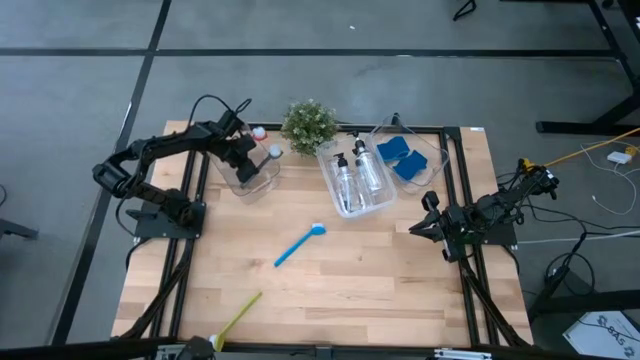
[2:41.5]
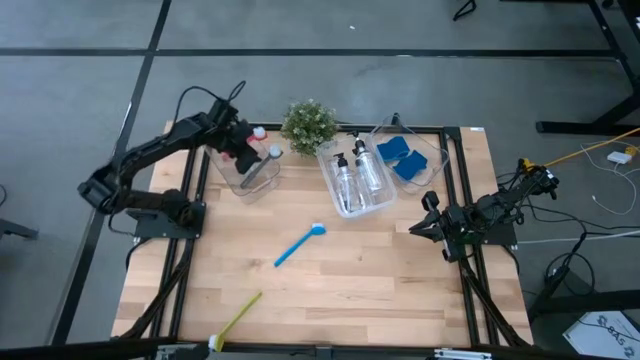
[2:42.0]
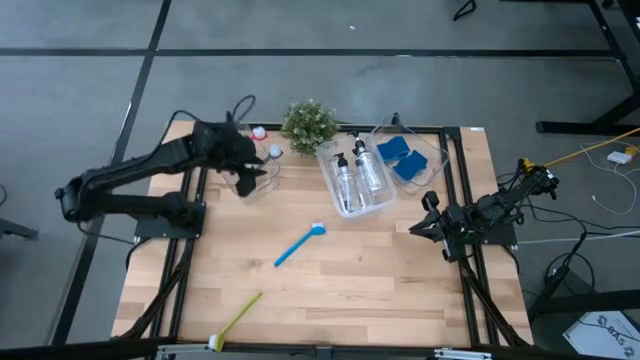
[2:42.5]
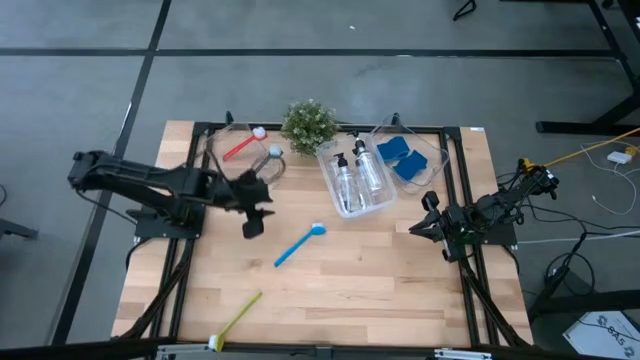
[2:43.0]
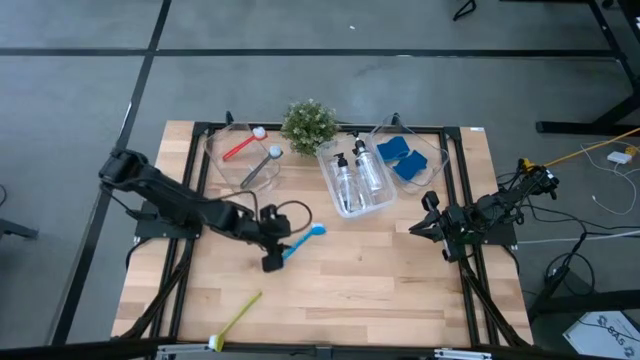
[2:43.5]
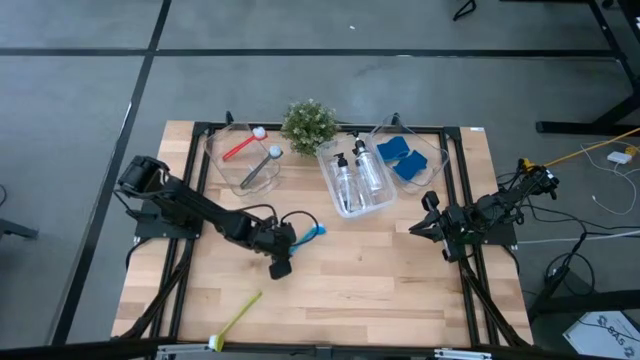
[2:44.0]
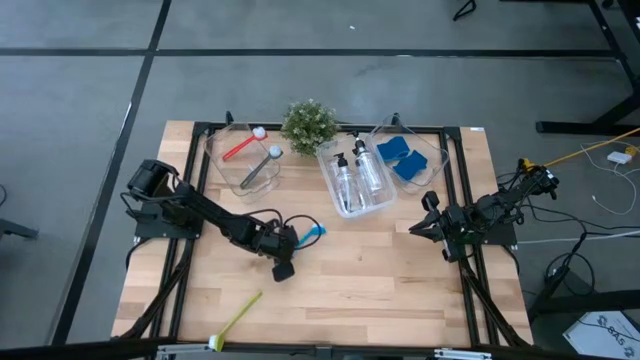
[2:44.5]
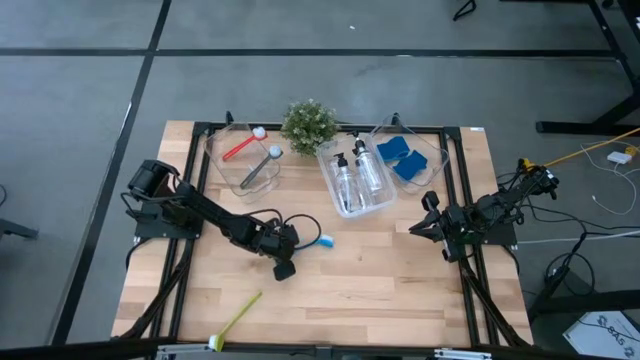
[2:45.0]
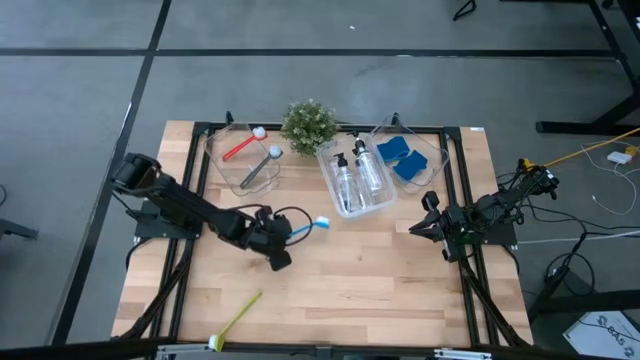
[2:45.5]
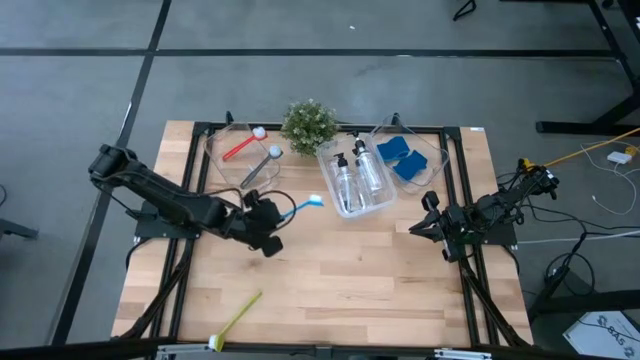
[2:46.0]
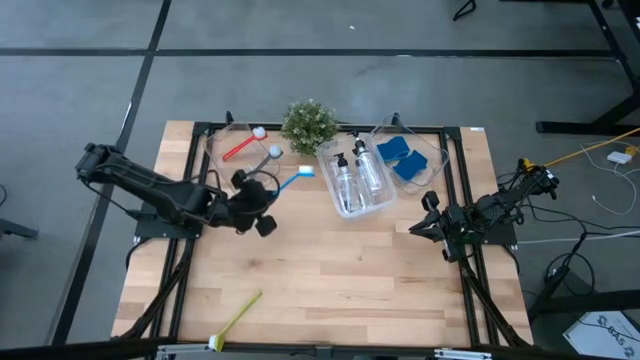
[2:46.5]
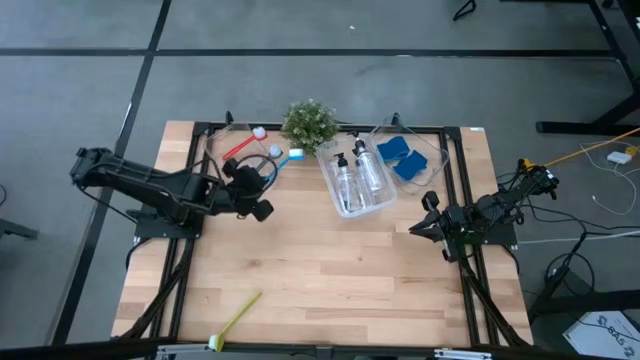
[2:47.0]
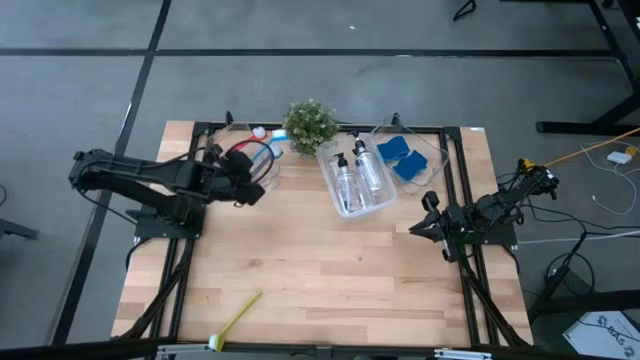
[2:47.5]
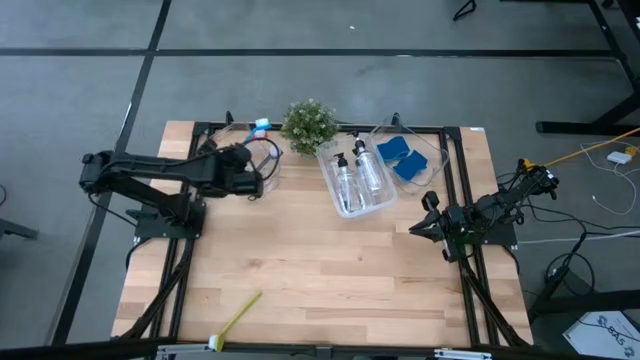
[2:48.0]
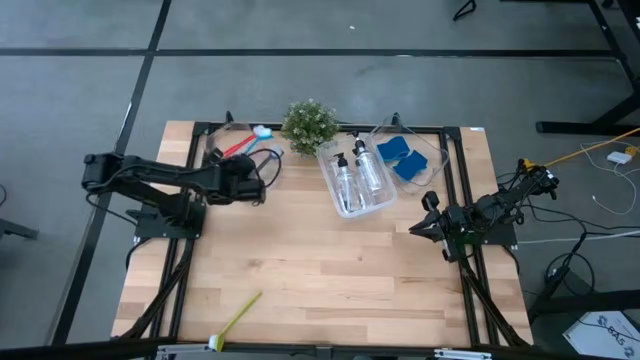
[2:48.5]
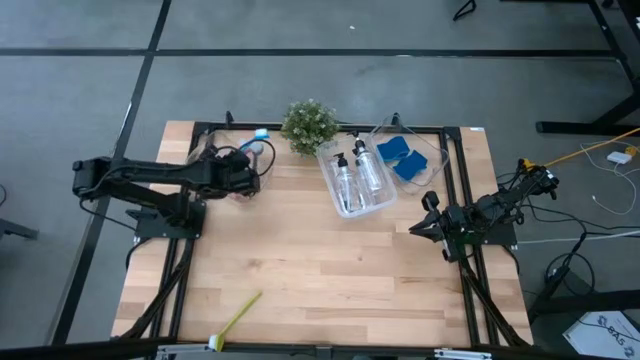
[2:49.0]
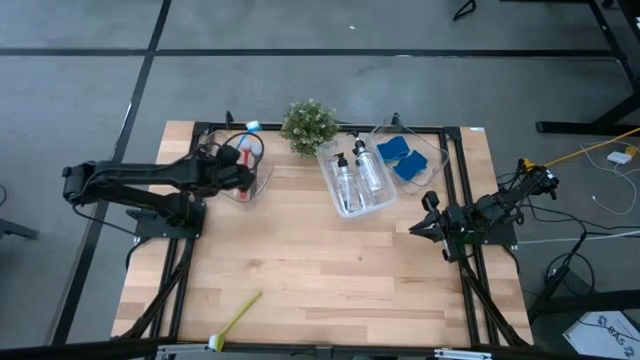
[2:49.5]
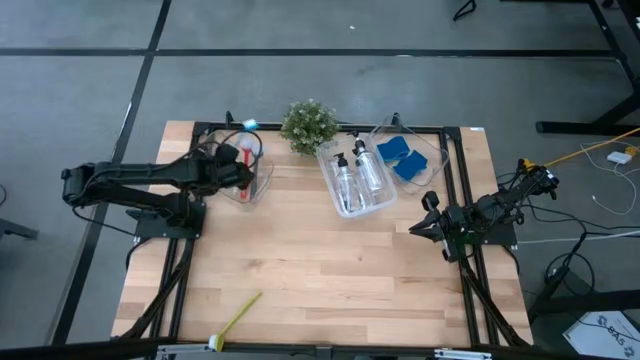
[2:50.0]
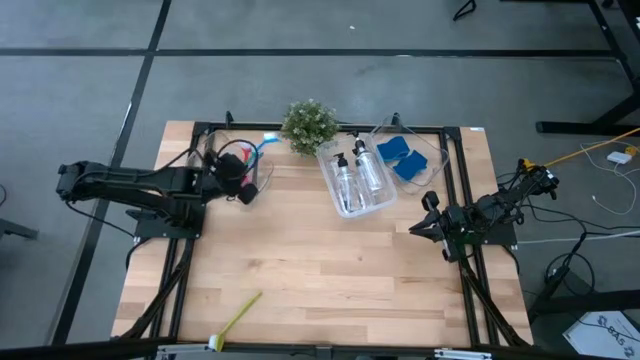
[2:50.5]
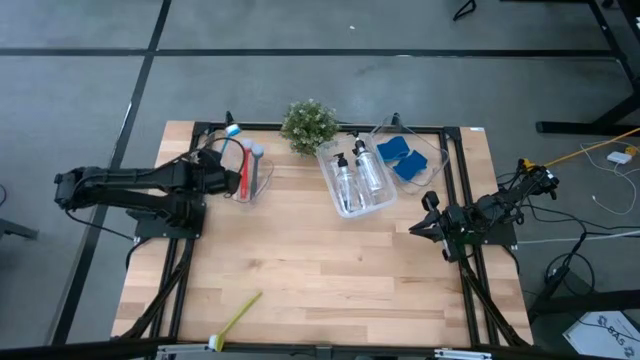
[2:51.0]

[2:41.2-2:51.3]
Task: Pick & Place Kitchen Sink Supplies
Put the blue dish brush into the left transparent bin

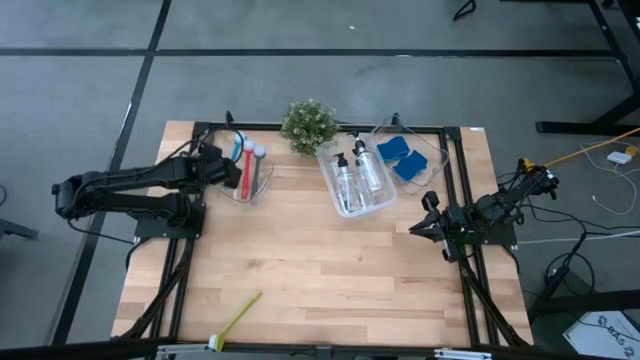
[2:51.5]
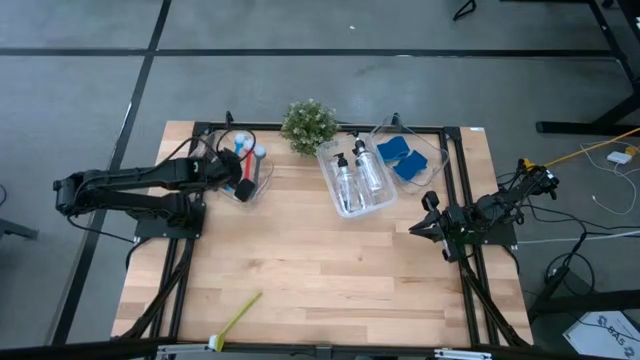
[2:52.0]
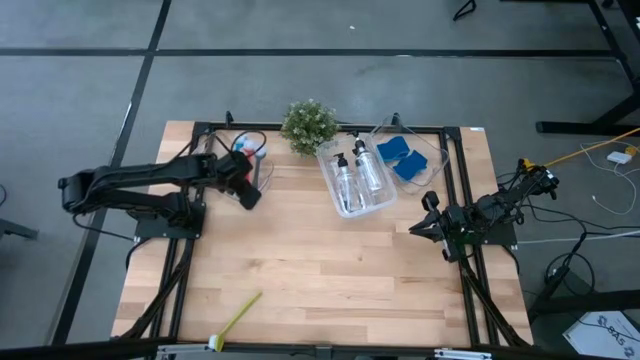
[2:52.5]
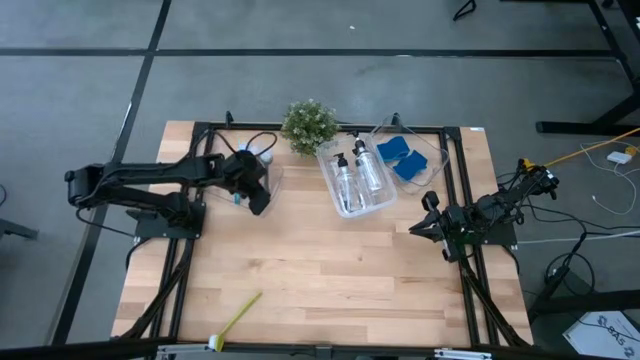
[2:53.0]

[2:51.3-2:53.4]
Adjust the left transparent bin

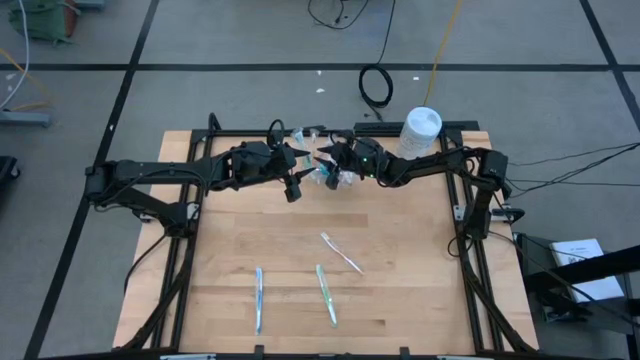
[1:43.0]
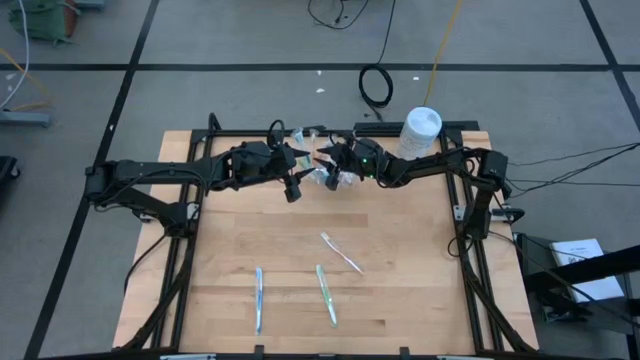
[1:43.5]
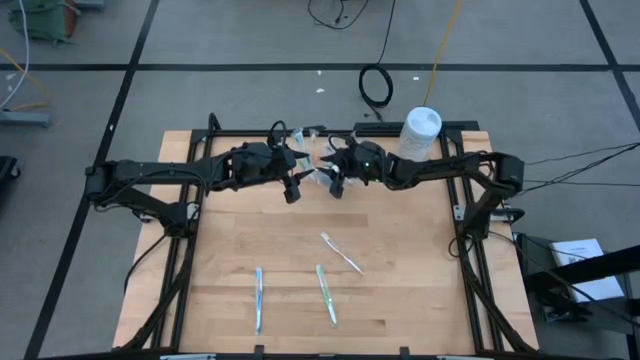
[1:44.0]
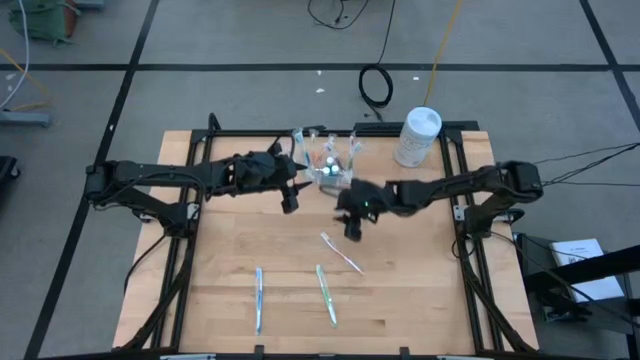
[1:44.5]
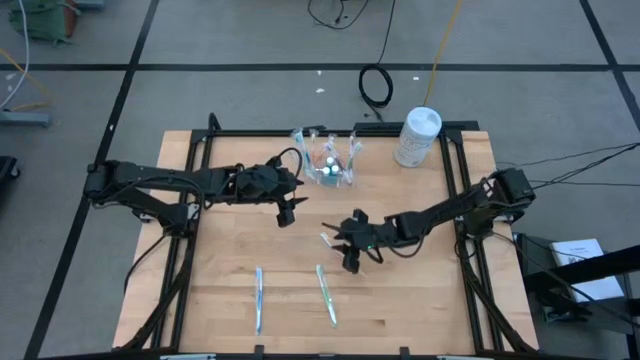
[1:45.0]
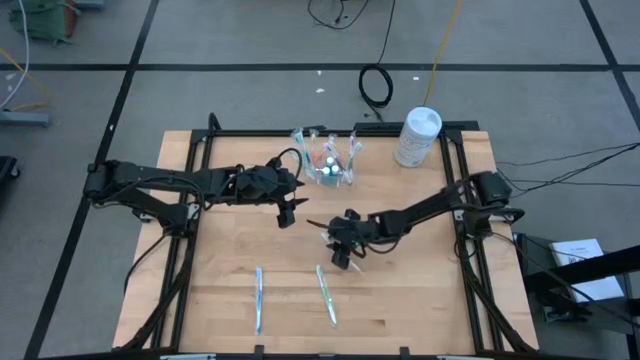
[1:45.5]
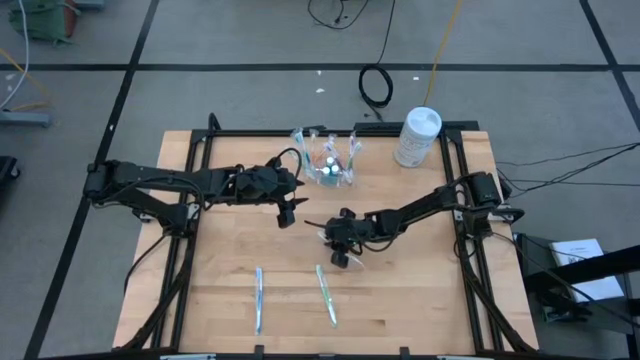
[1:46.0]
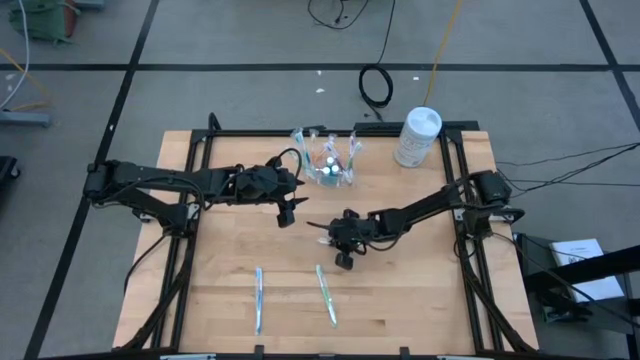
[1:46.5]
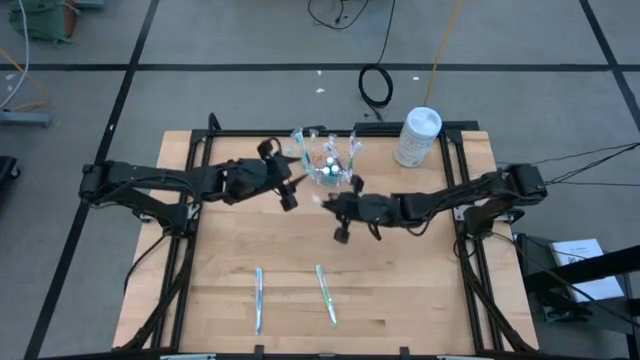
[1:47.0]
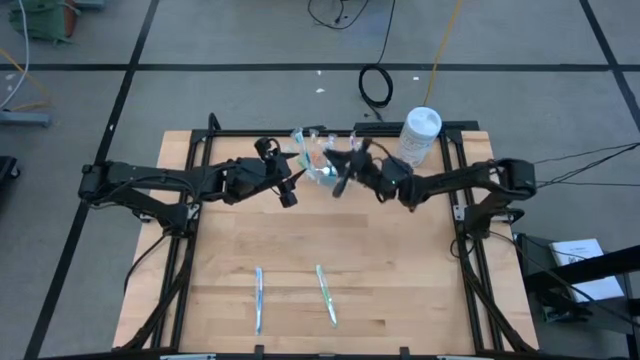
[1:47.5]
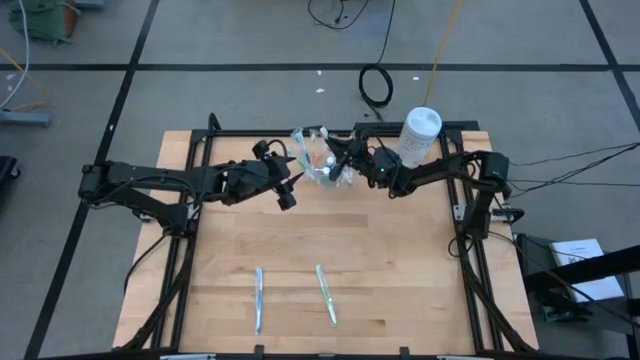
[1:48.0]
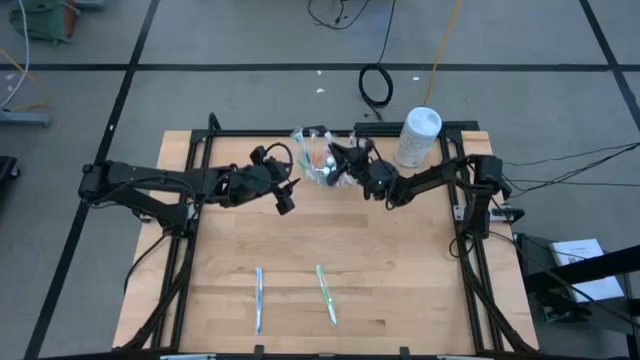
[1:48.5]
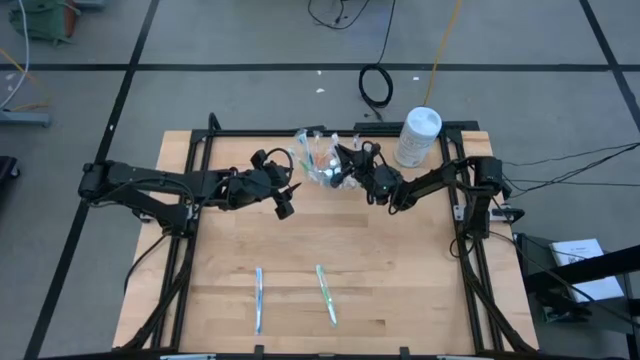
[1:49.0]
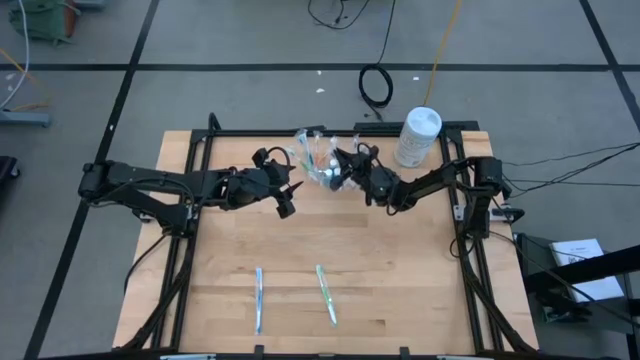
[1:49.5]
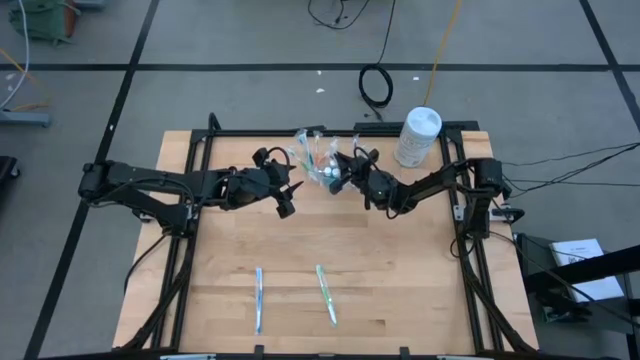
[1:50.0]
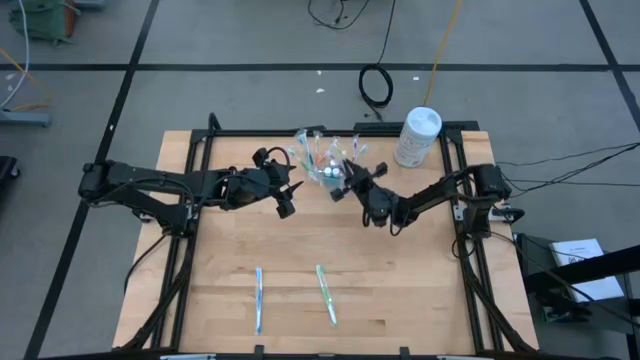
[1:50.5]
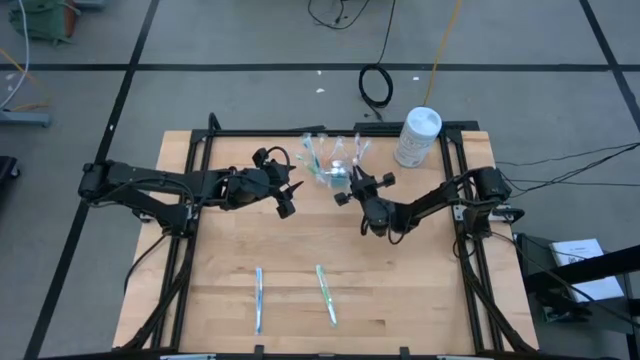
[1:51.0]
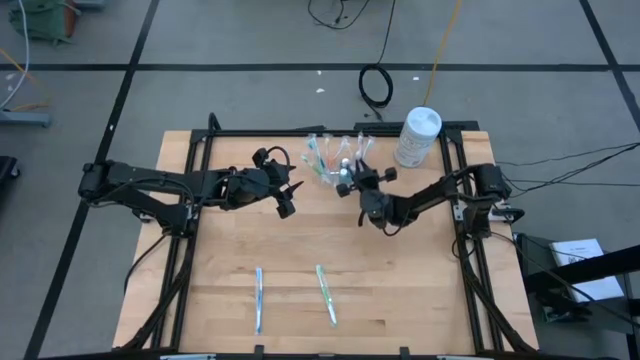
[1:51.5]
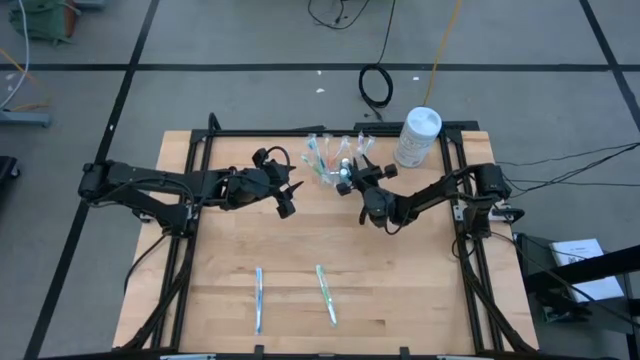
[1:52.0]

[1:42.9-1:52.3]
Task: Pick & Place toothbrushing station
Put the orange toothbrush into the transparent organizer
